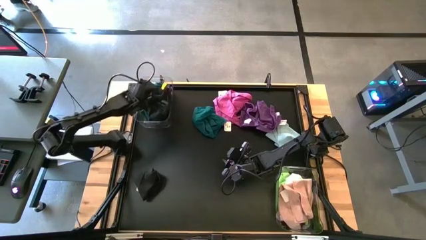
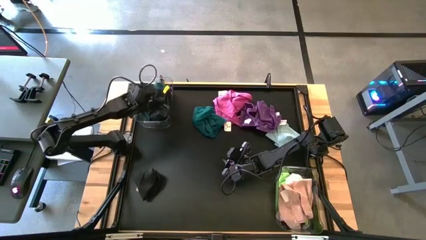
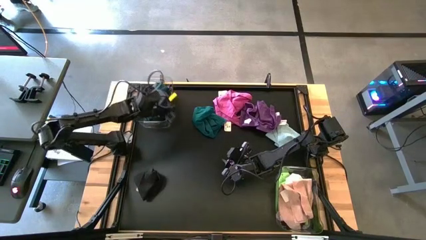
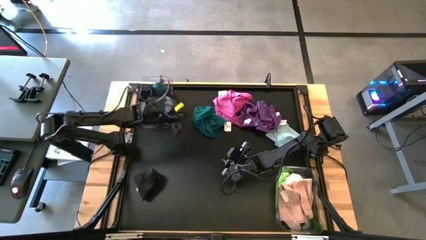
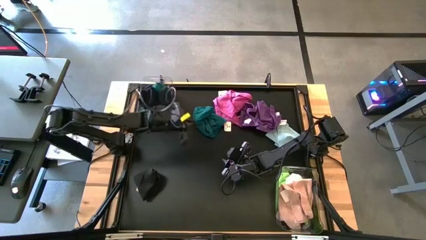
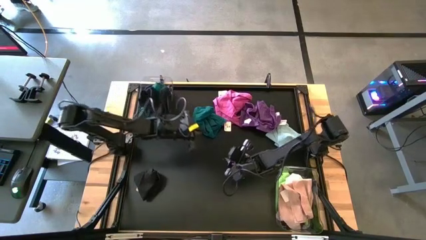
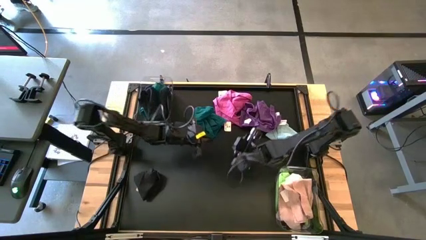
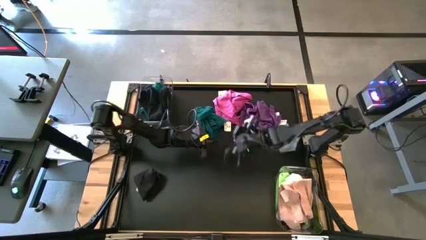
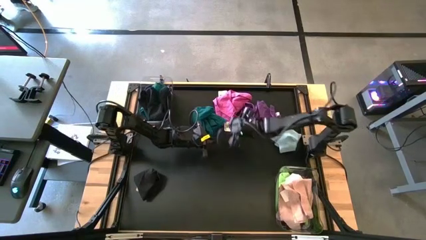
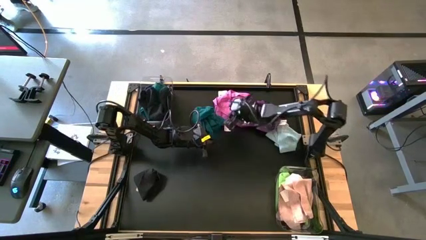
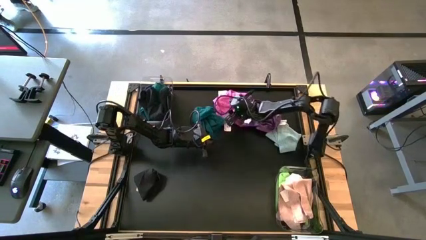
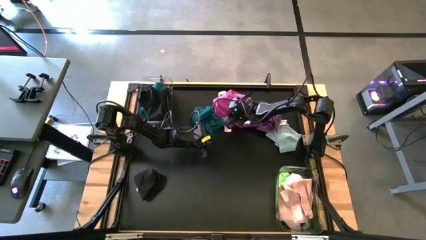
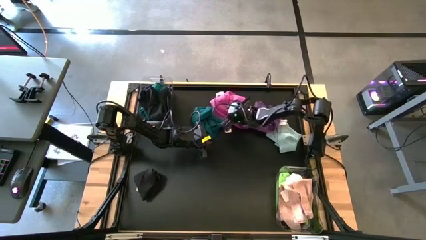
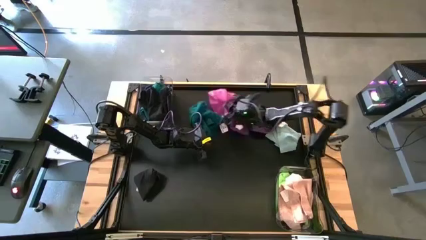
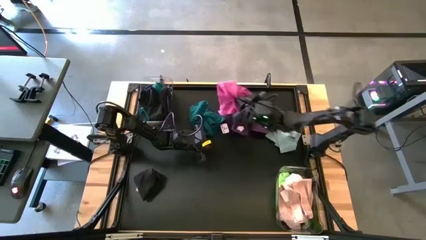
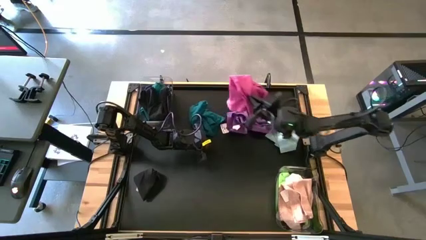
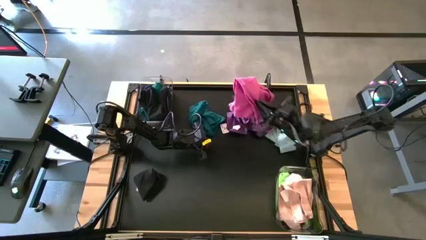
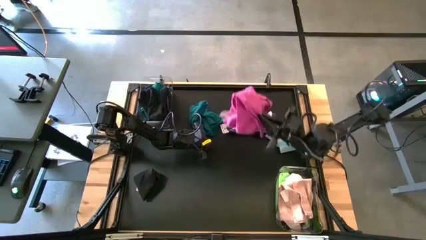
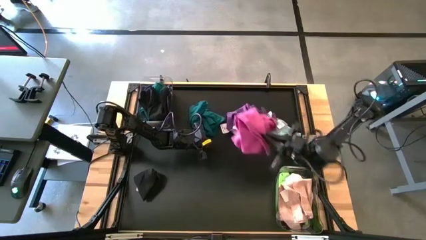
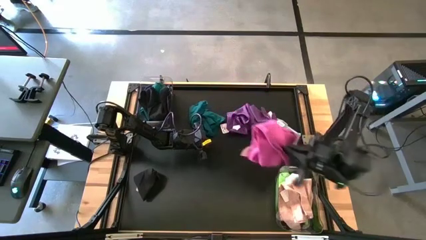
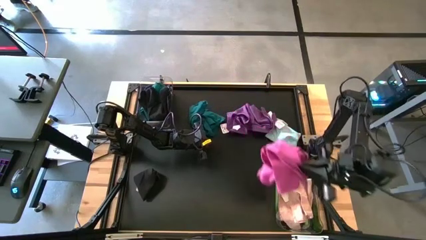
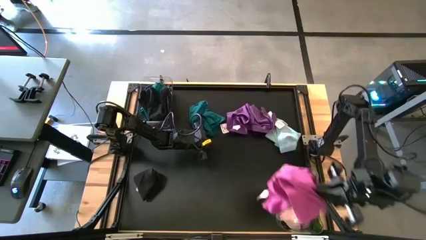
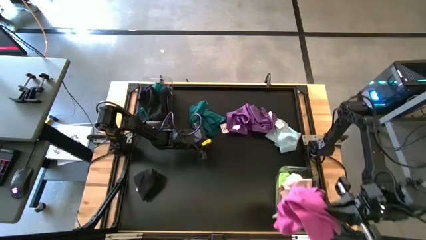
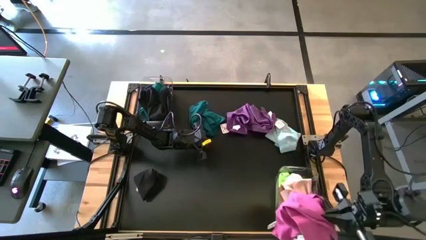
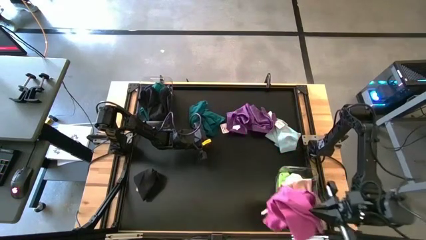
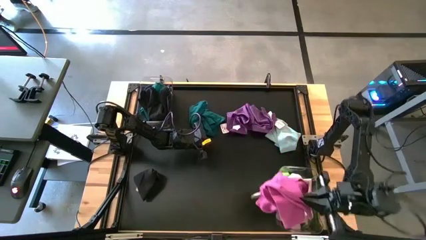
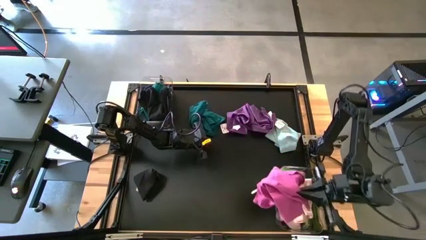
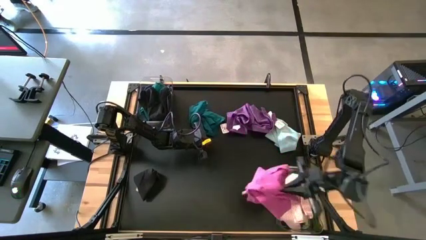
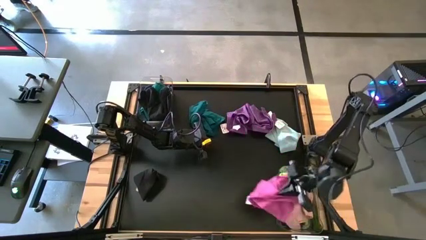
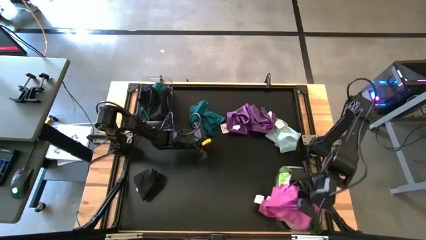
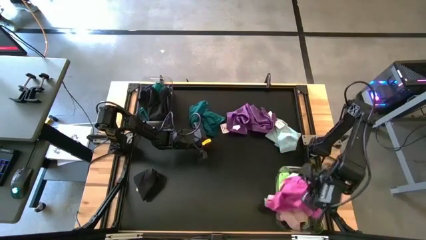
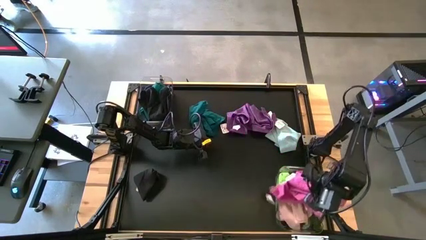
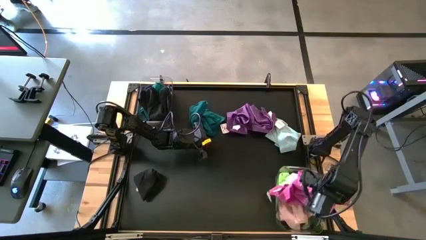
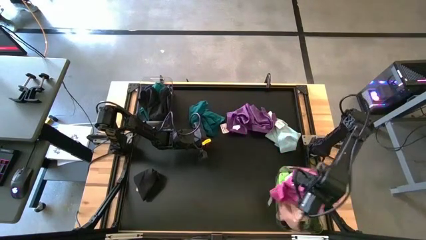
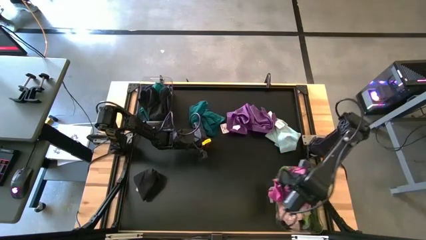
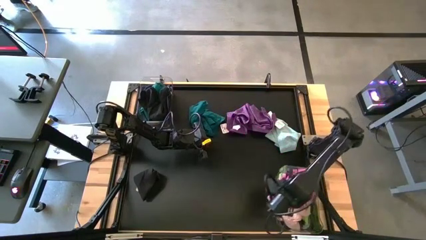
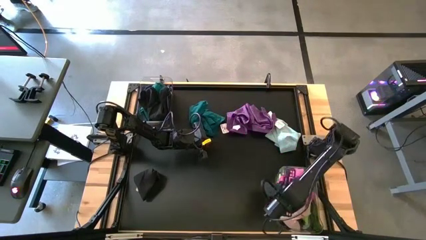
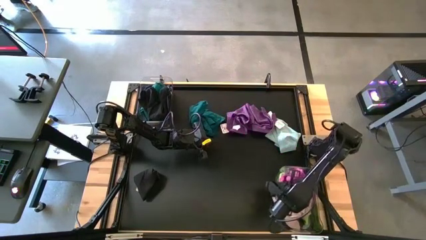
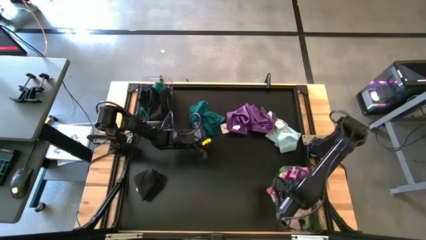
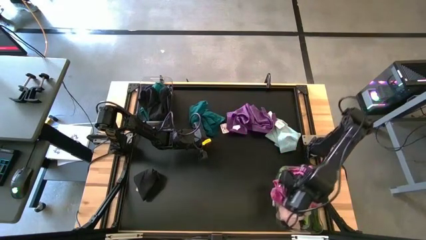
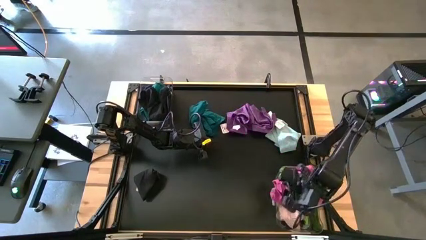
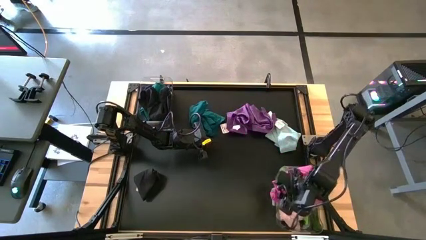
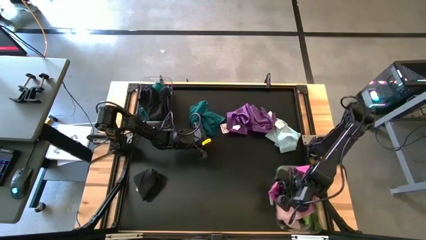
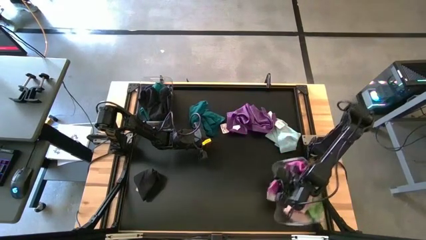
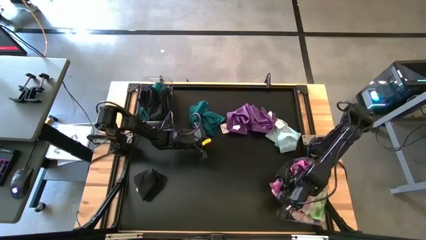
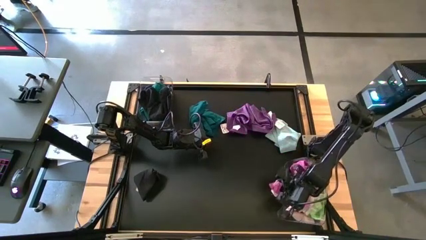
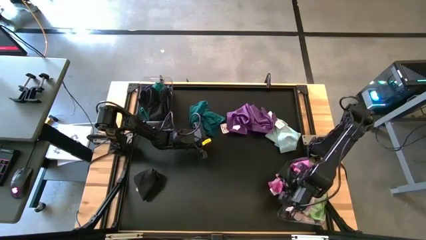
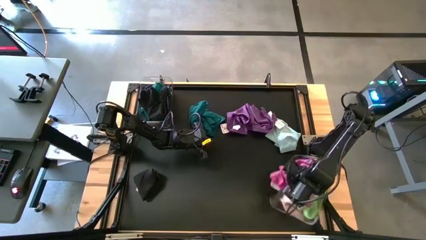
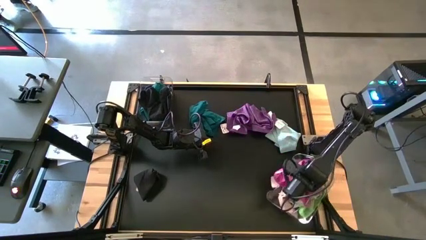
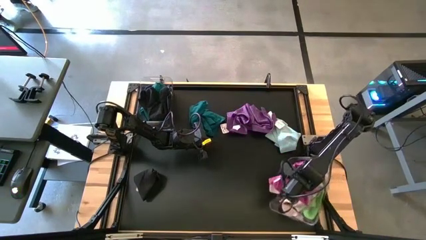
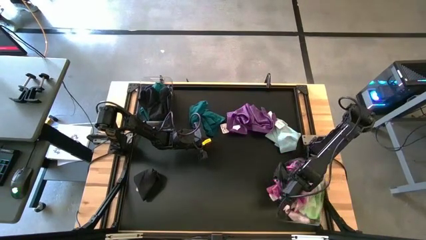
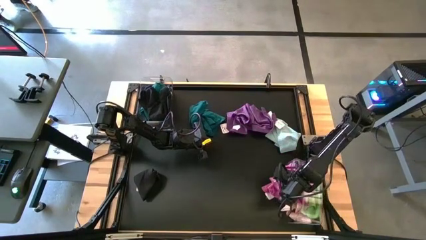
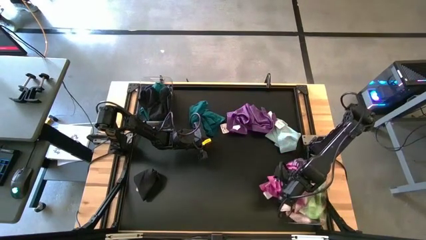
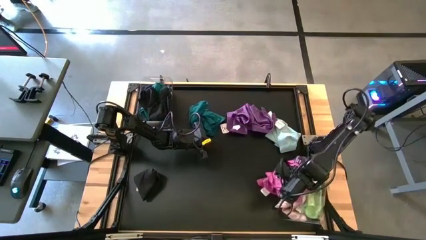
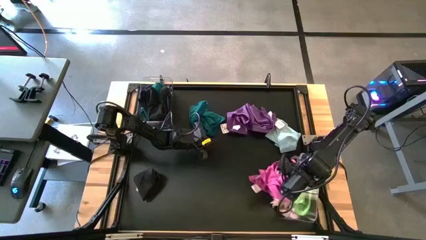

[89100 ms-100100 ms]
Task: Sort towels by color in basket
Put the pink towel into the bottom transparent bin

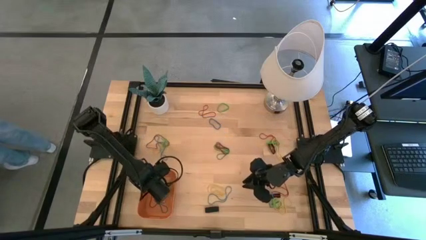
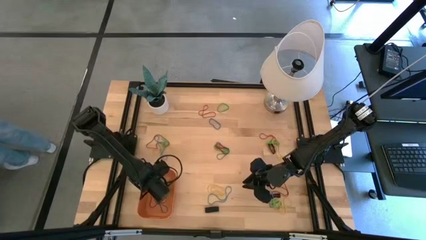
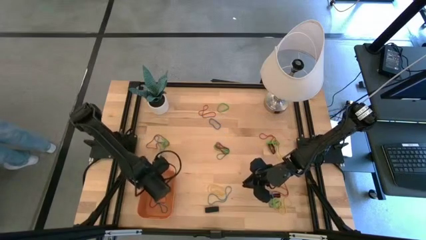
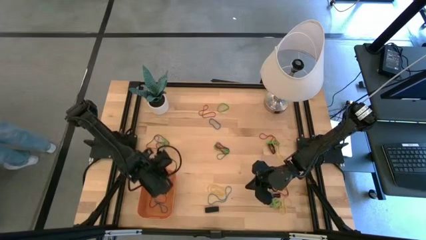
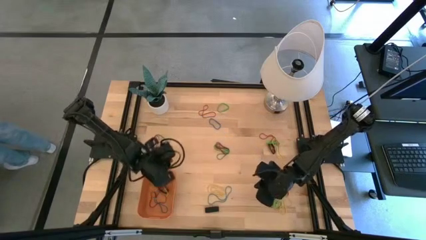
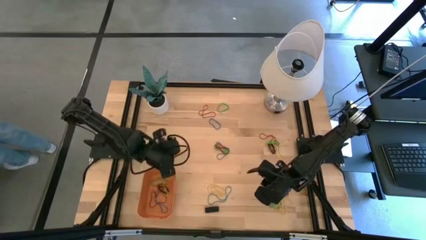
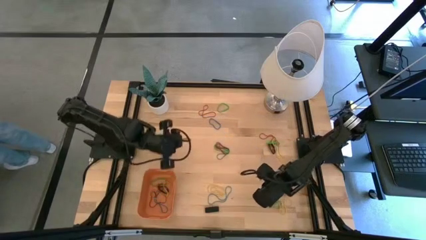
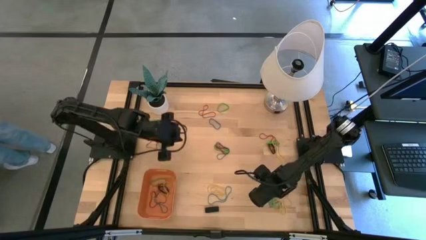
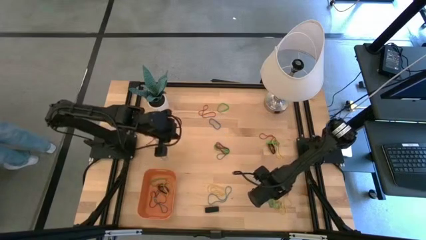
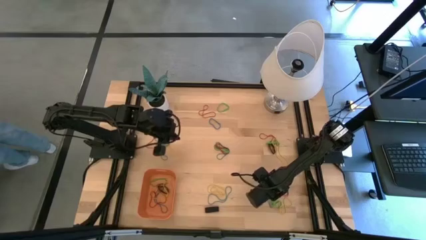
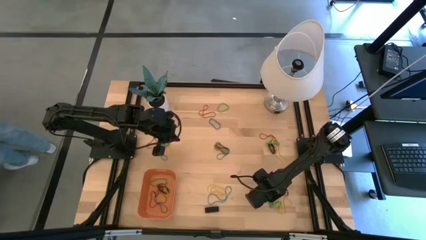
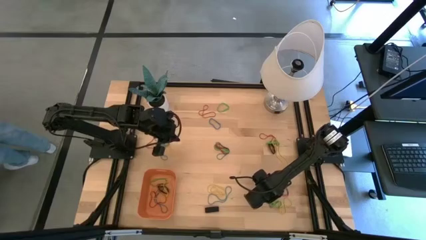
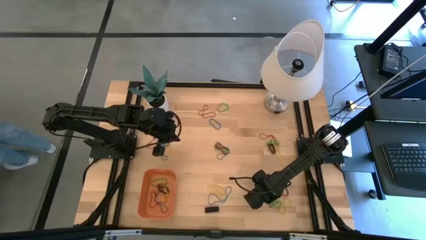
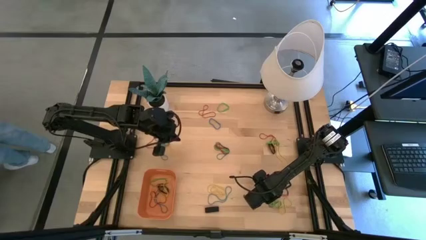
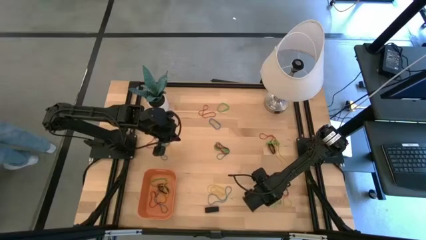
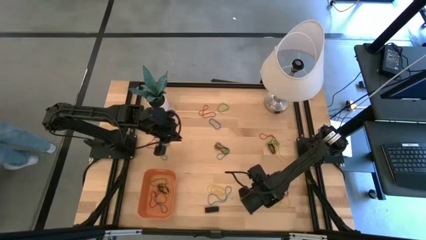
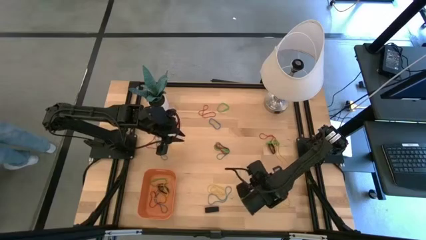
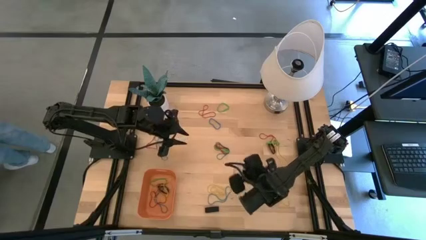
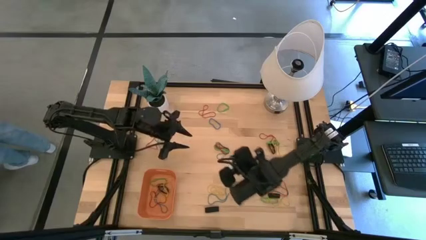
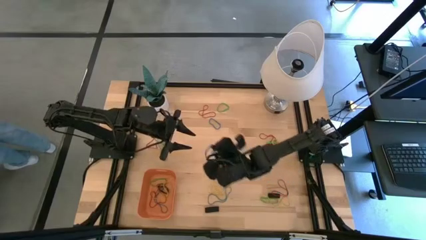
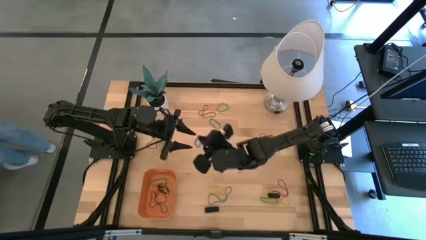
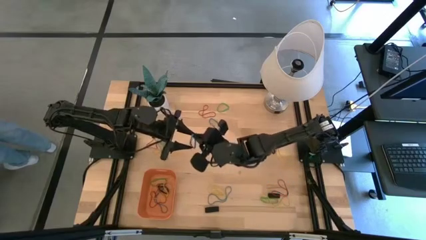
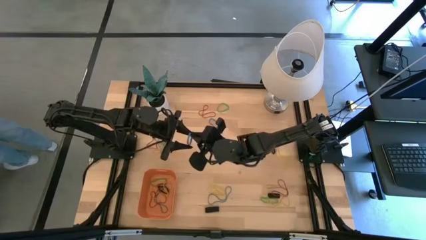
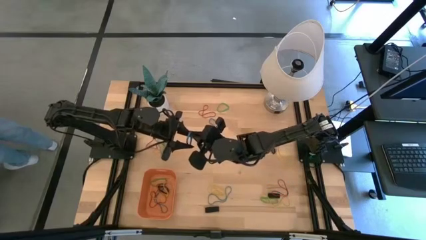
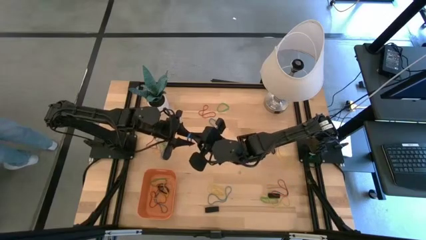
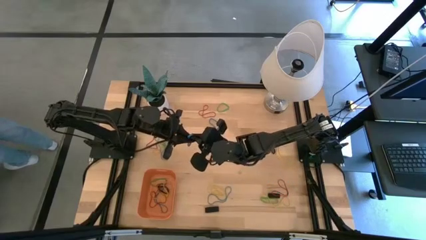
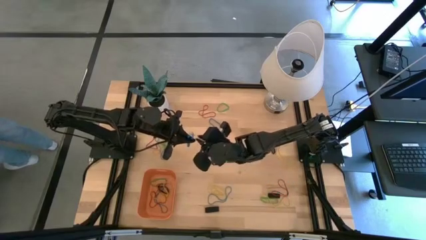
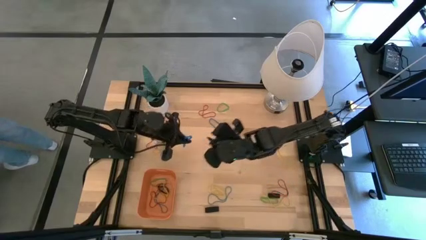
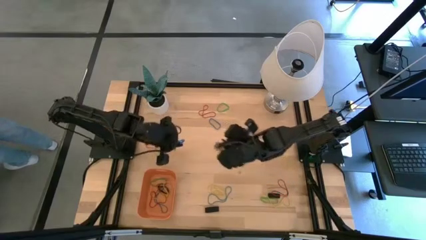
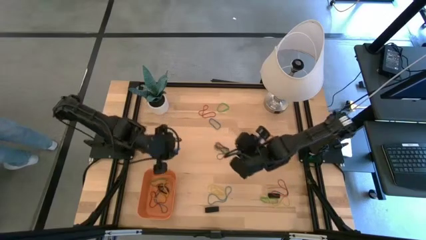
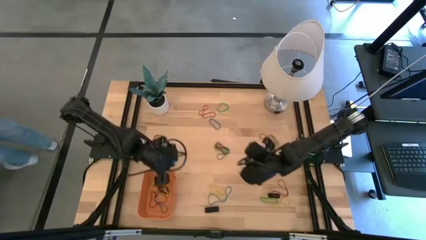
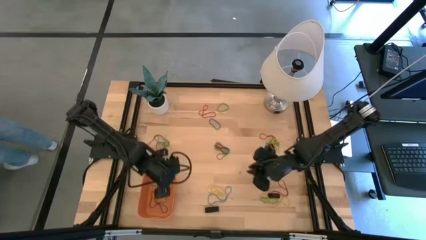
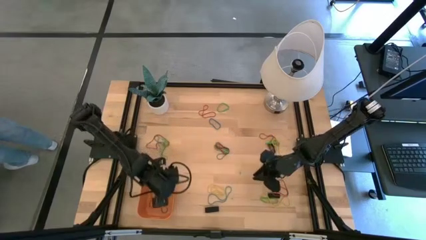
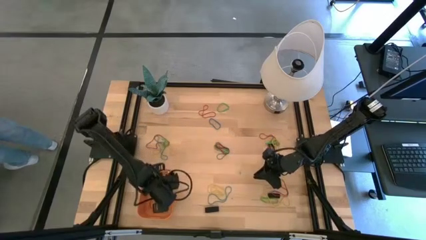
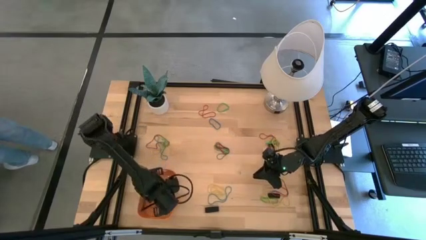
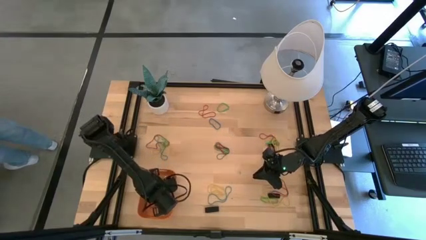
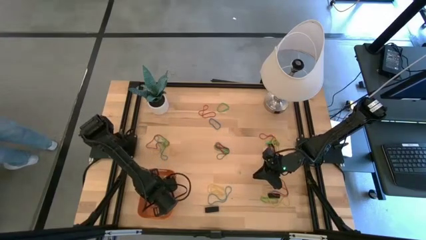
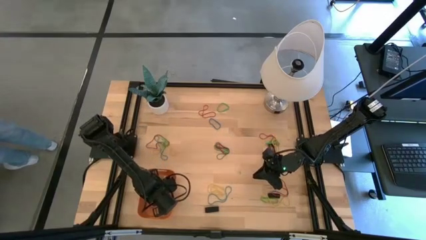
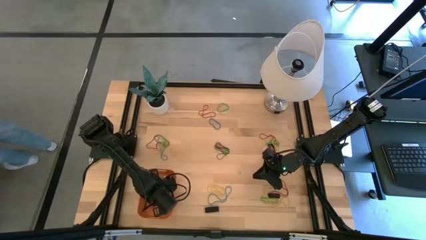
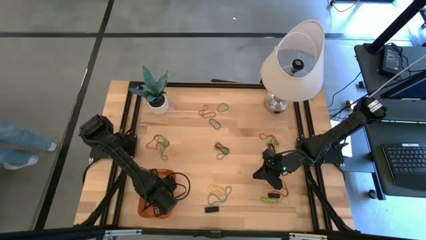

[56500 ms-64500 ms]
Task: Pick and place rubber bands into bin
Put the blue rubber band into the orange bin
